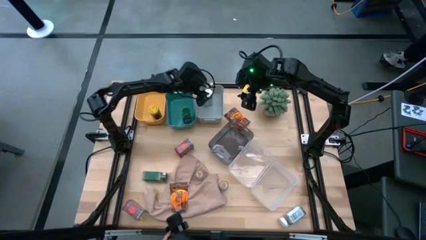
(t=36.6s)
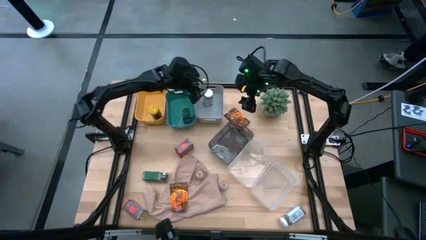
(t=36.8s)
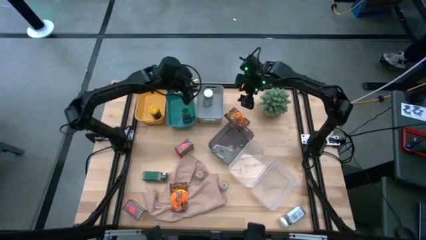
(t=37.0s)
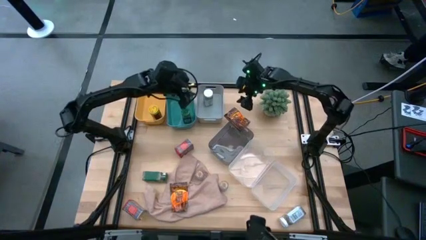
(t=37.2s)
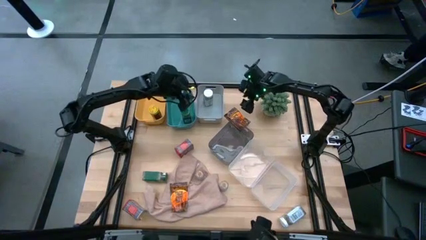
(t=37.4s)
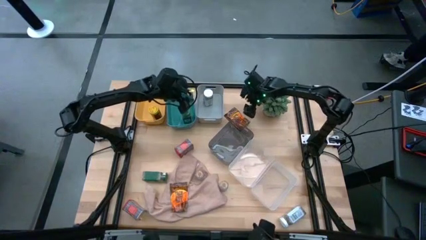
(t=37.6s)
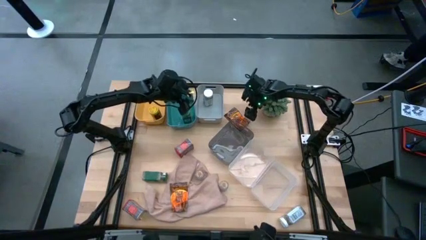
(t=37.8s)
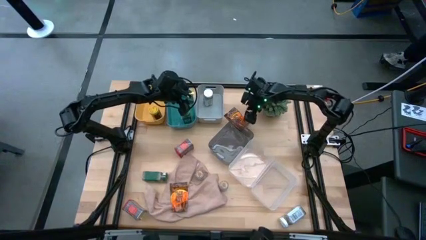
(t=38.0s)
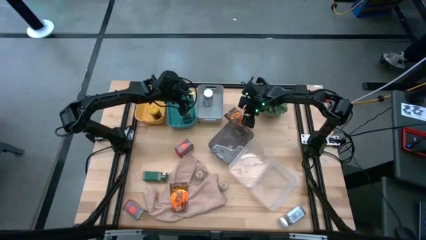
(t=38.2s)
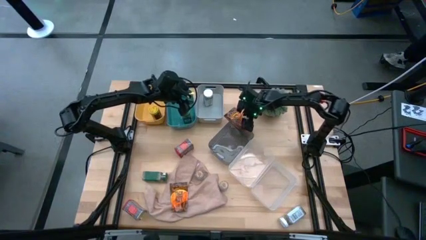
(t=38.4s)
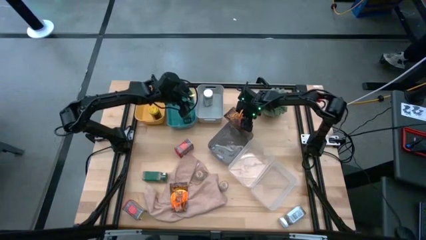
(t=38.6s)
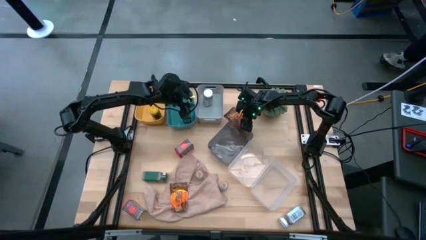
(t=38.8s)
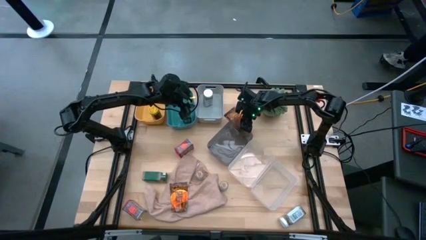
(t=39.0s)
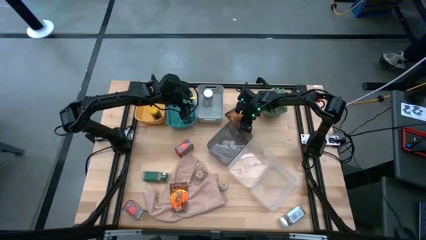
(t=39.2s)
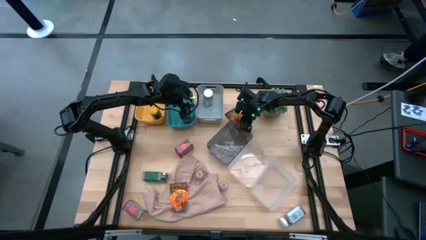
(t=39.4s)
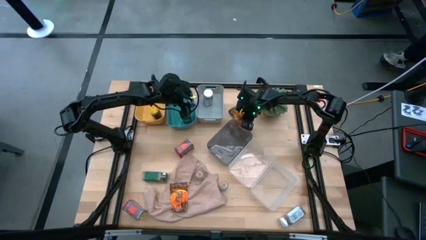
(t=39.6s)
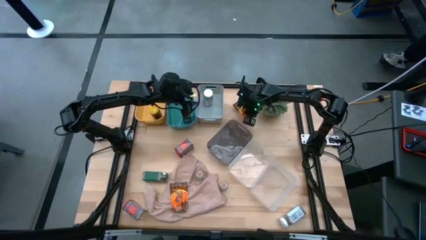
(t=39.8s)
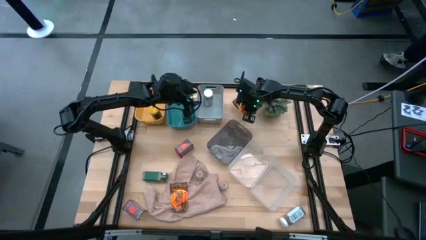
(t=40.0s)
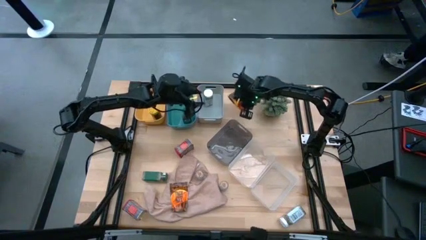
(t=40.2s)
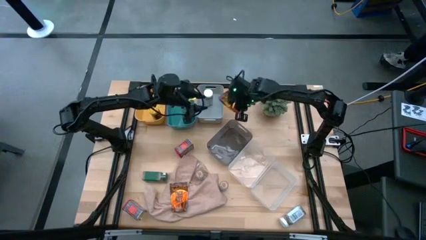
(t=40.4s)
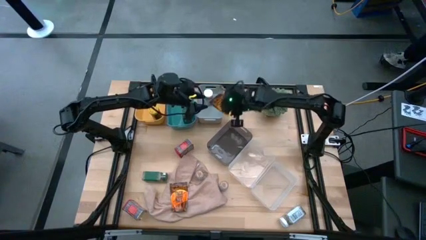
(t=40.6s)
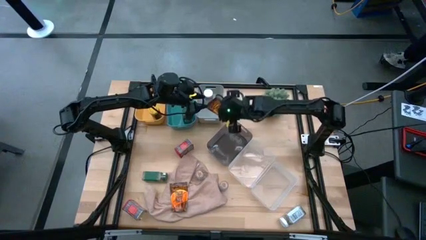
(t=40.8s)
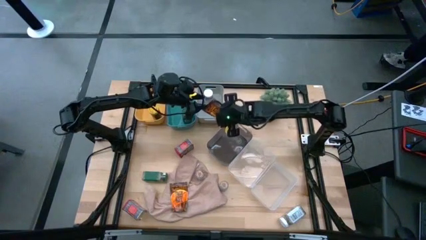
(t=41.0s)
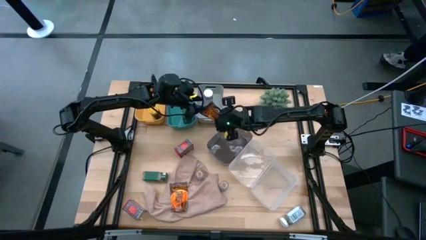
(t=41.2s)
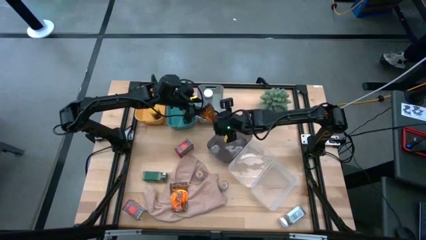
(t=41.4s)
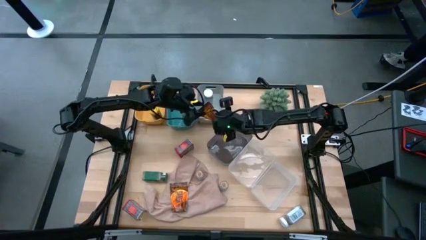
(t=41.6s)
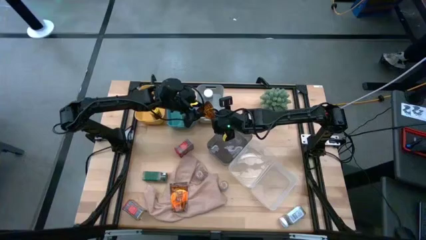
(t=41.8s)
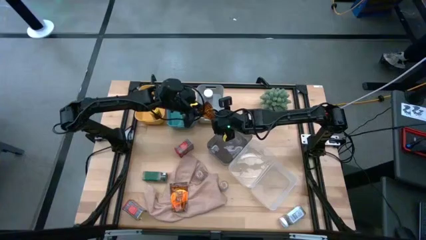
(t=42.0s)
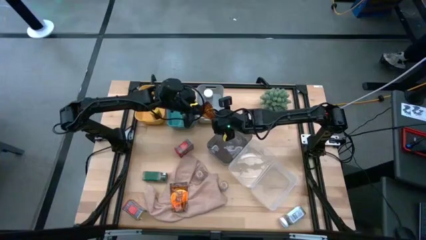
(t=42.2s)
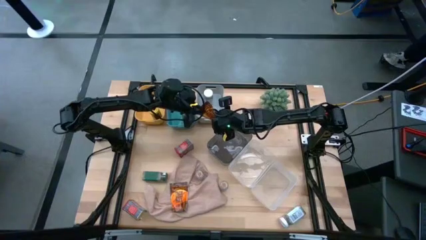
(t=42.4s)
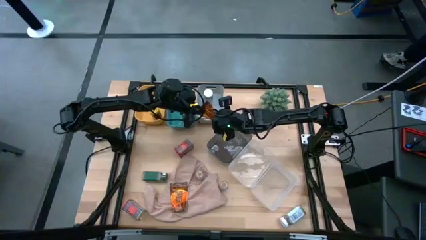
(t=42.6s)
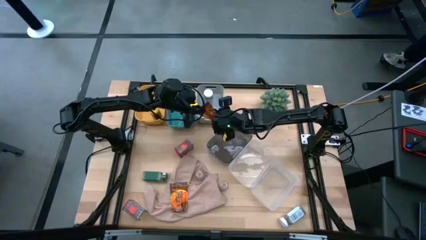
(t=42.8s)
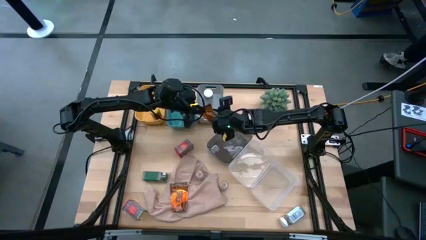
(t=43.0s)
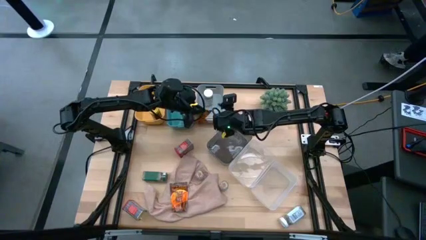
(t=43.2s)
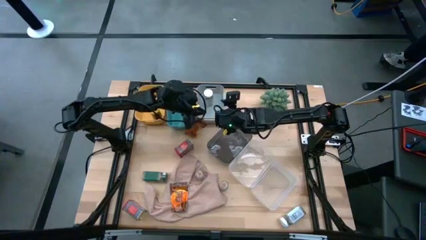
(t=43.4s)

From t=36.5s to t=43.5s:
Task: Sort spices by type
Put the top orange seasoning pack into the black bin

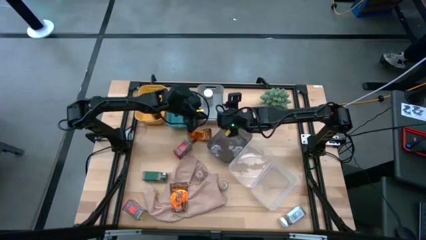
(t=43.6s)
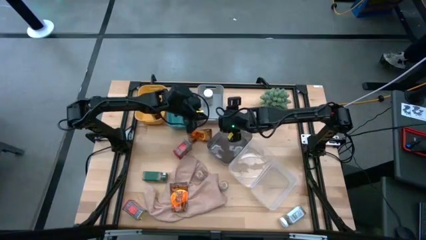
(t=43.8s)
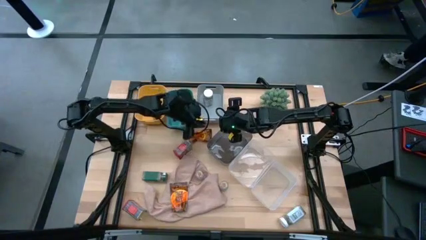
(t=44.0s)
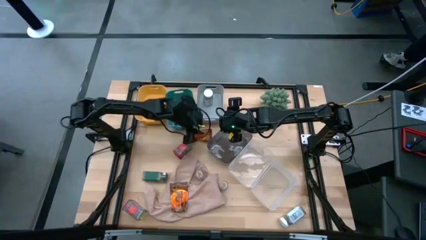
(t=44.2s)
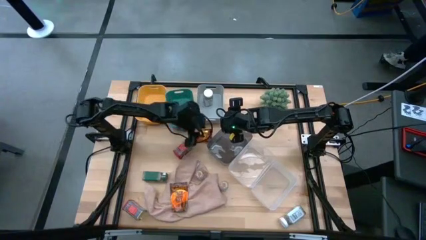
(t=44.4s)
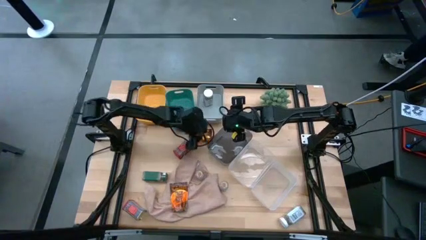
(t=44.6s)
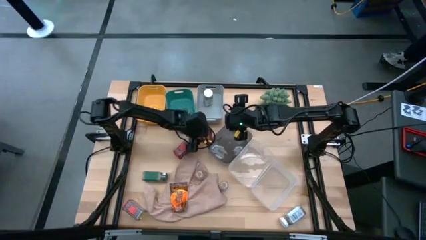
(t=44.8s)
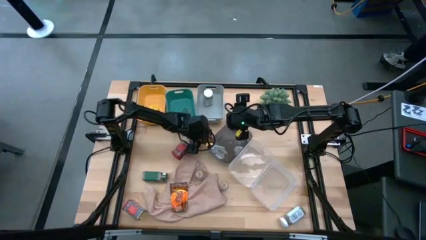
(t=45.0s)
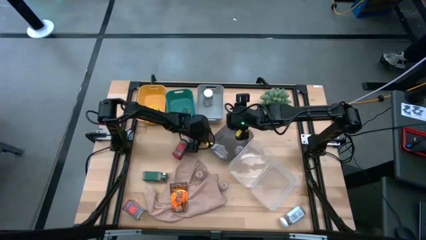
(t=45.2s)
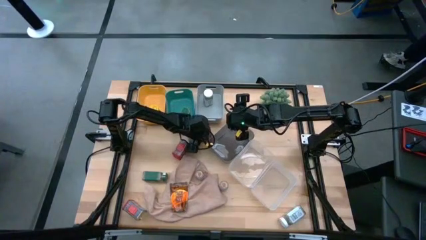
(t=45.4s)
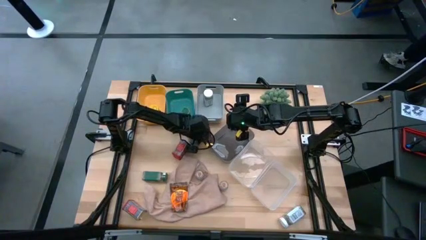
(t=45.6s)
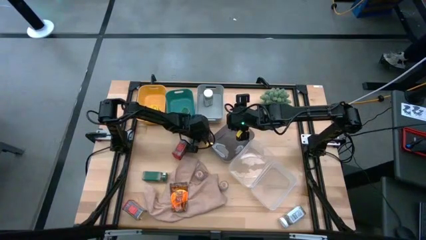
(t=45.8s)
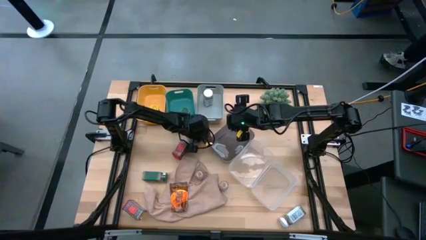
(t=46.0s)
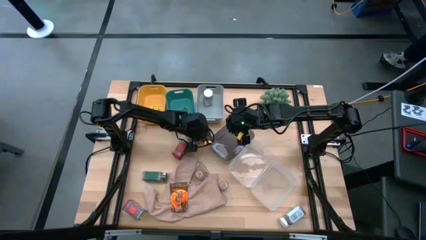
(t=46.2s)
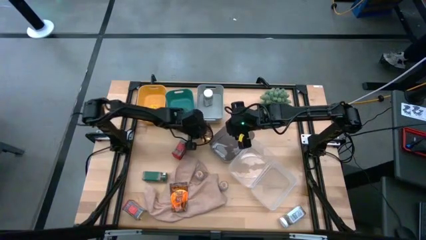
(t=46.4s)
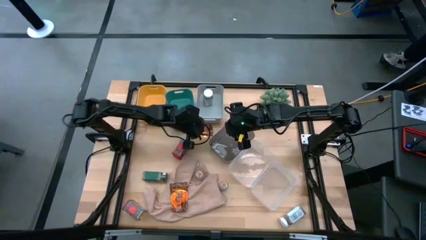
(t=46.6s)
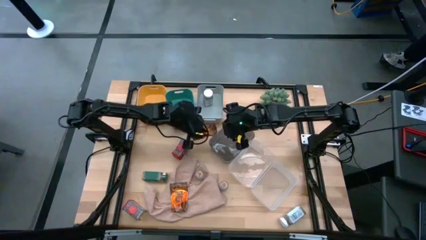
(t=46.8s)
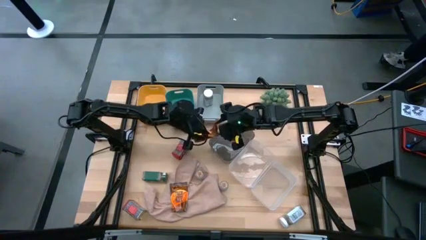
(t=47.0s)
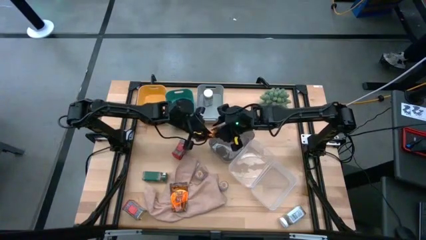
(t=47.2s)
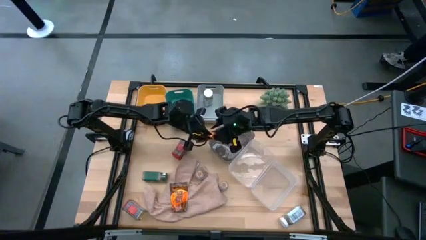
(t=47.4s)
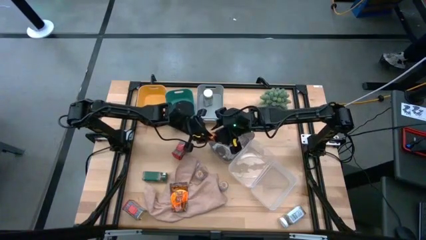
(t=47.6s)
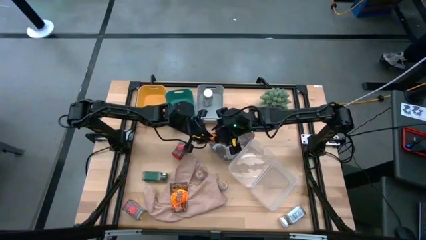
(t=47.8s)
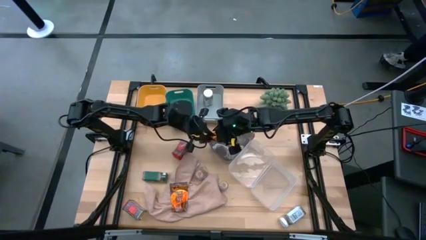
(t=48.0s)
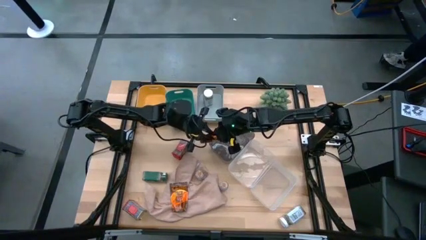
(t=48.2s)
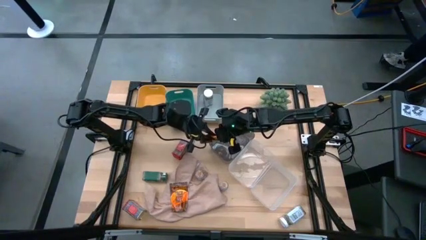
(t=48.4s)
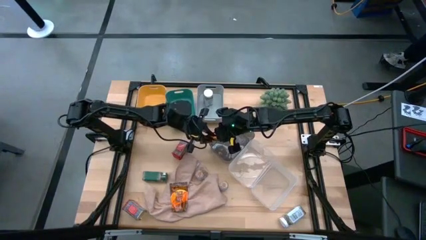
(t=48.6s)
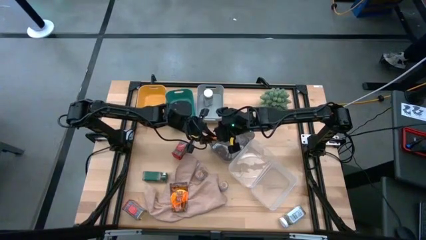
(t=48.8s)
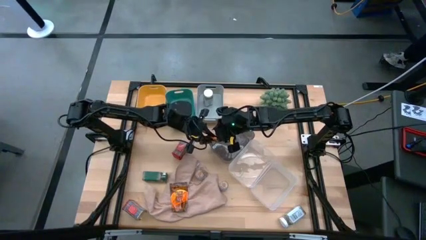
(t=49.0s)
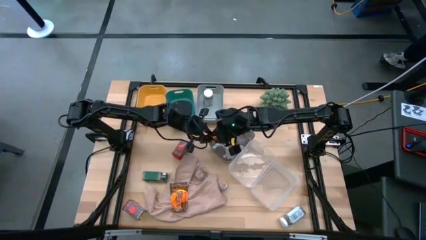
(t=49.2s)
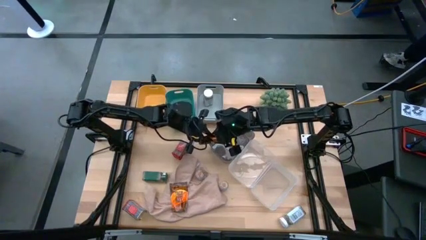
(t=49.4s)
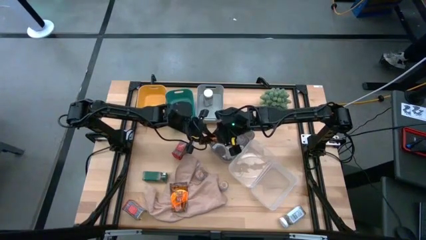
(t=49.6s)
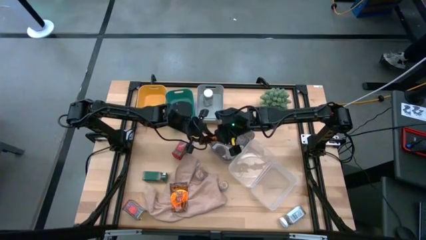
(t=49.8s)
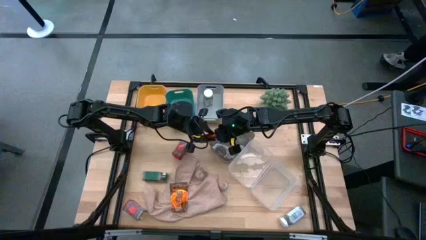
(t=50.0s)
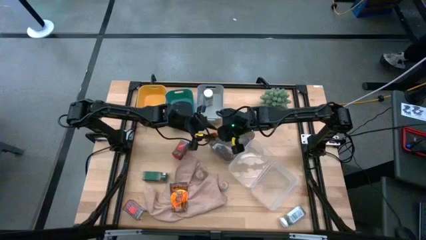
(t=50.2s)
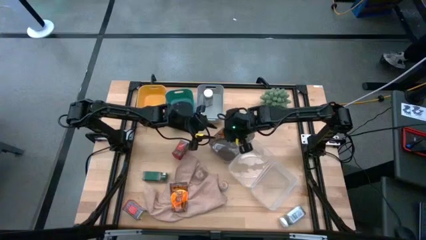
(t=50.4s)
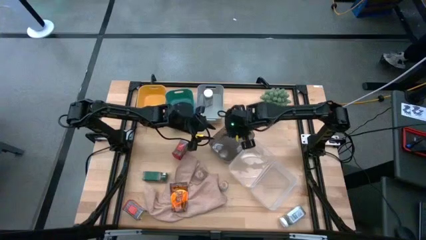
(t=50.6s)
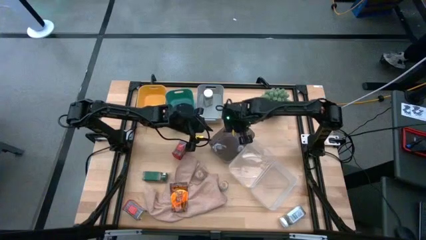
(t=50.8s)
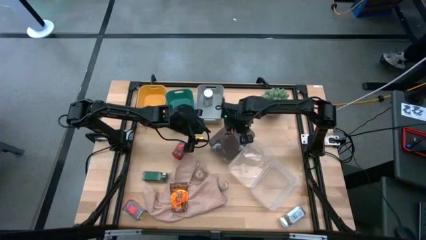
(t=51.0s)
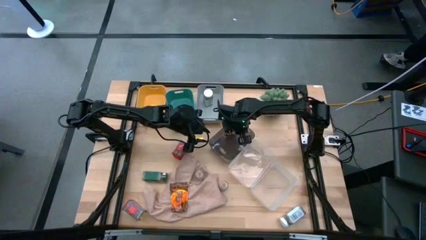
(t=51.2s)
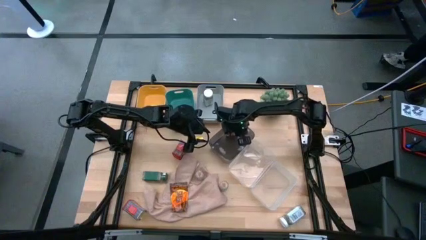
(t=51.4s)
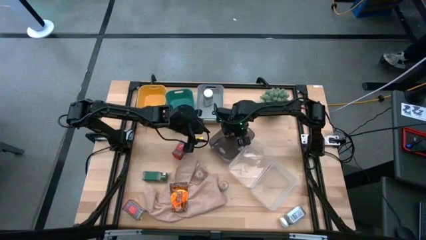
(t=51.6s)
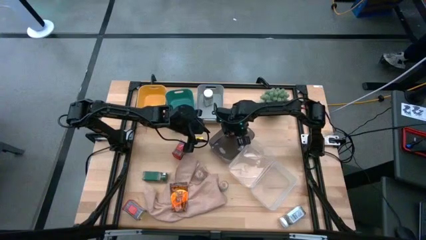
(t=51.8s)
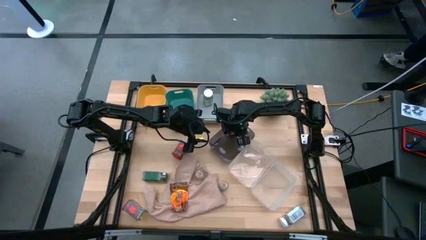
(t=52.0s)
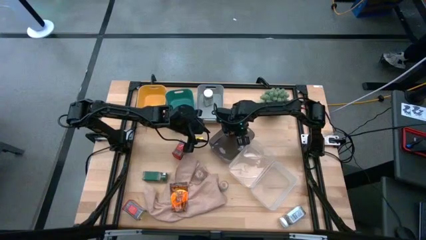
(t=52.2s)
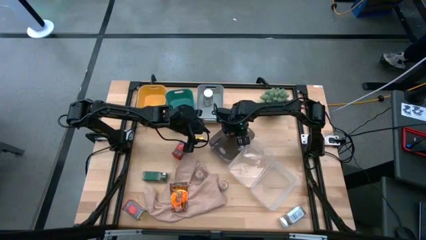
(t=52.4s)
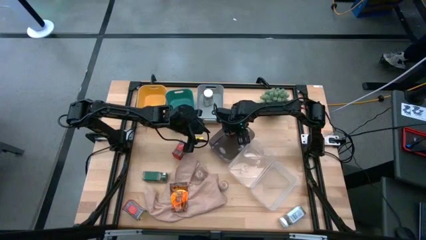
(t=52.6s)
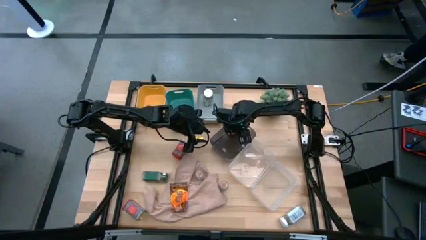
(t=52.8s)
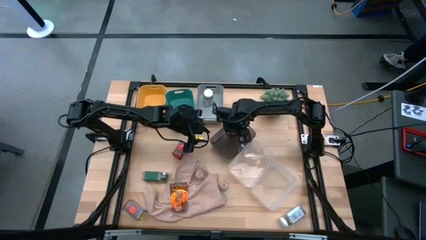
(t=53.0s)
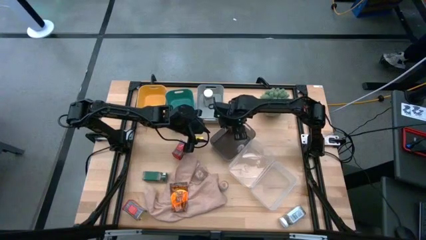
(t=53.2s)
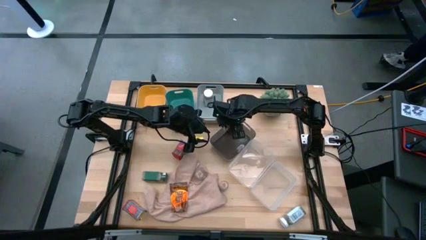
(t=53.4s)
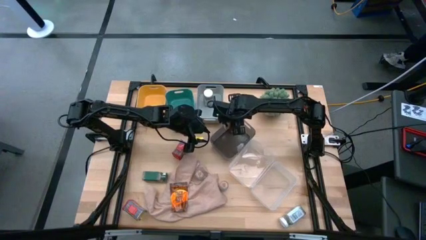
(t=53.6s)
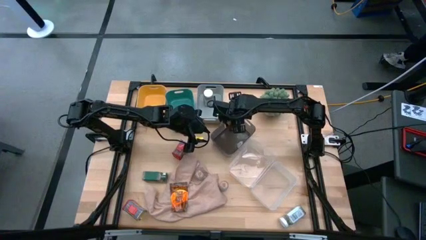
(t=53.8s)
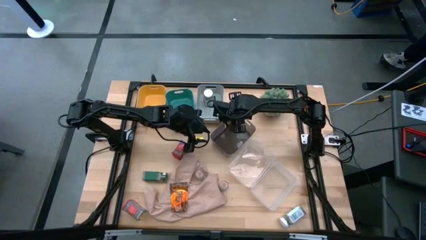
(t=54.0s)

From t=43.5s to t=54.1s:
Put the top orange seasoning pack into the black bin
